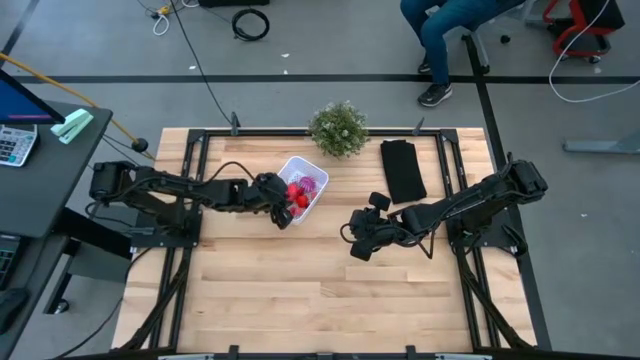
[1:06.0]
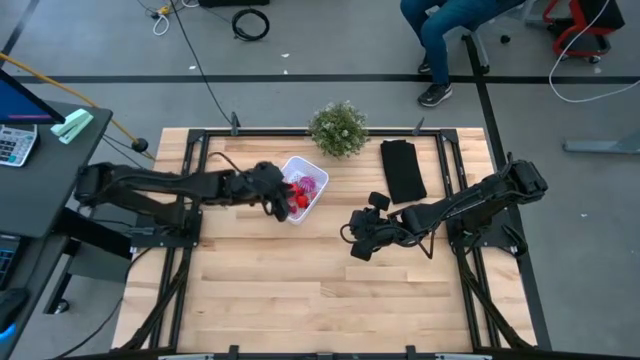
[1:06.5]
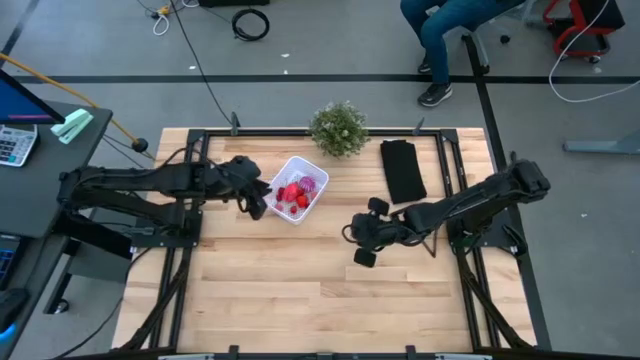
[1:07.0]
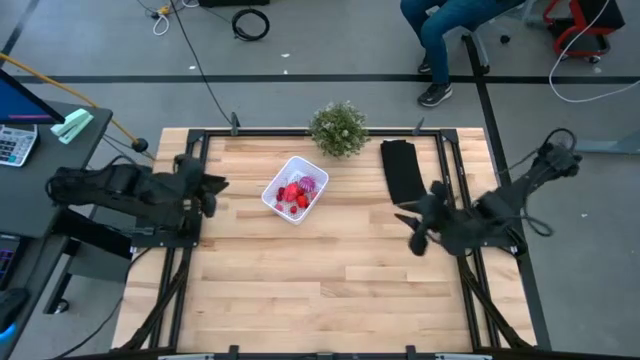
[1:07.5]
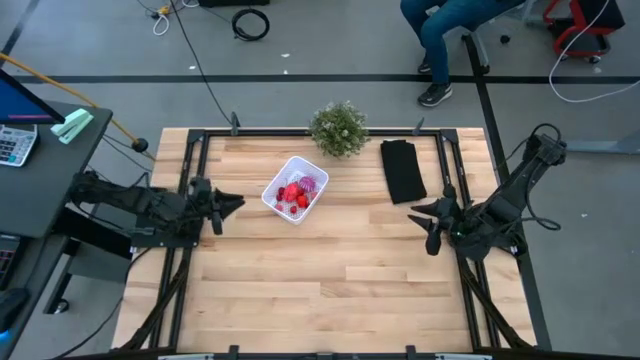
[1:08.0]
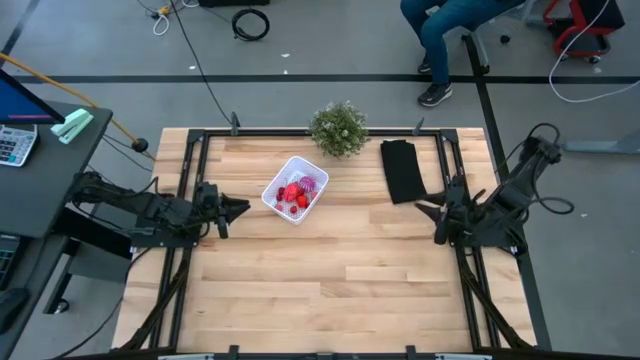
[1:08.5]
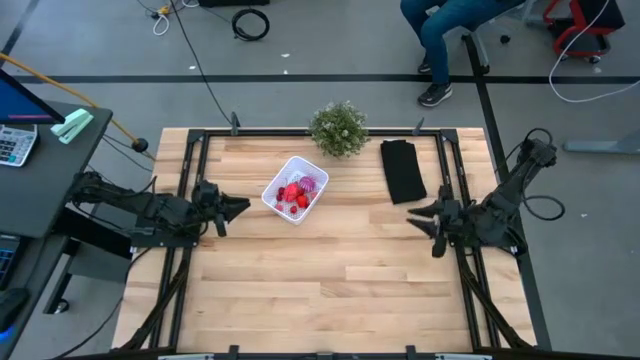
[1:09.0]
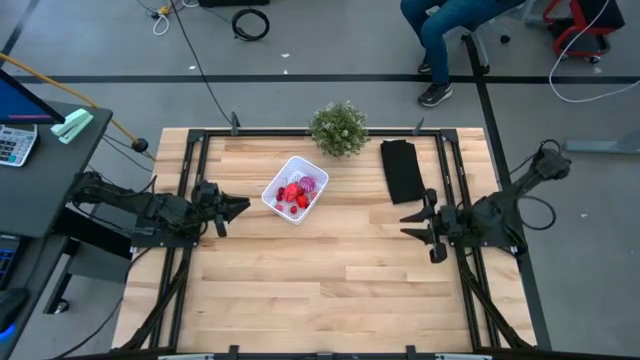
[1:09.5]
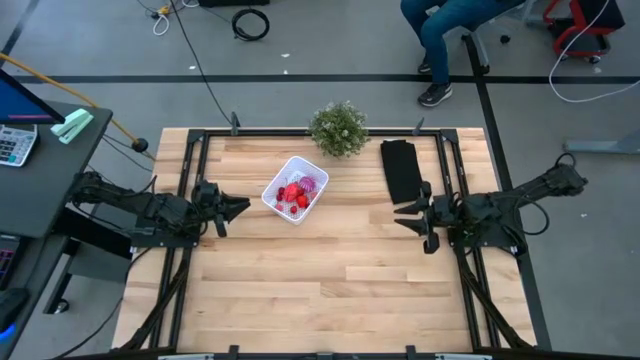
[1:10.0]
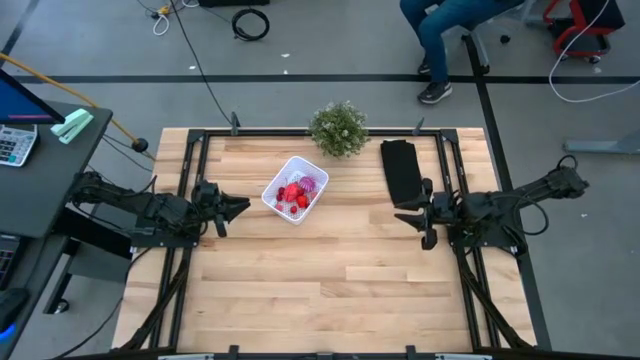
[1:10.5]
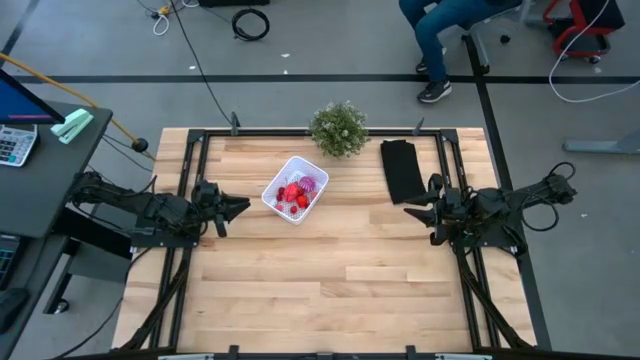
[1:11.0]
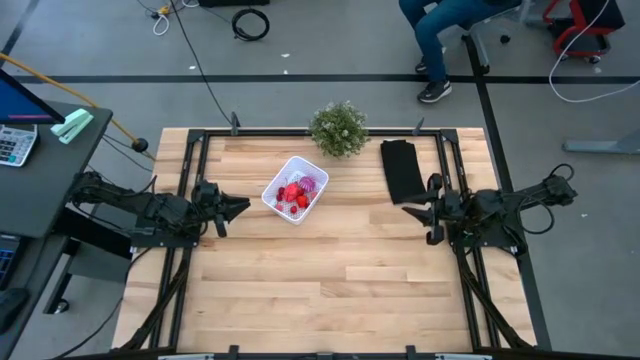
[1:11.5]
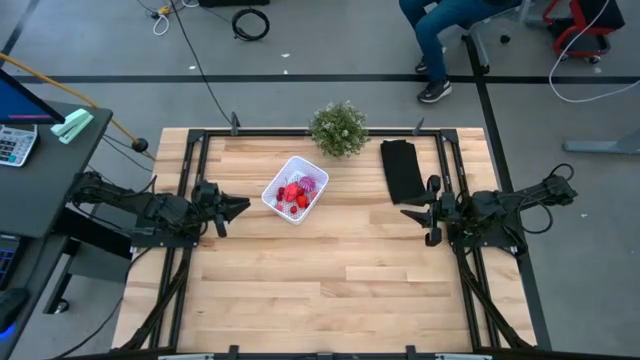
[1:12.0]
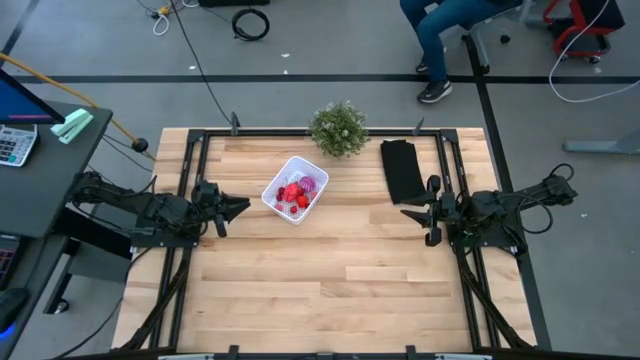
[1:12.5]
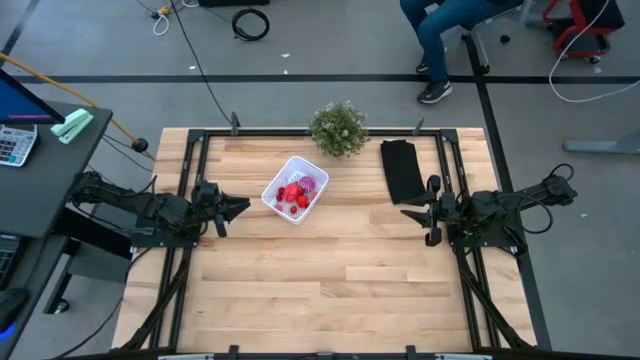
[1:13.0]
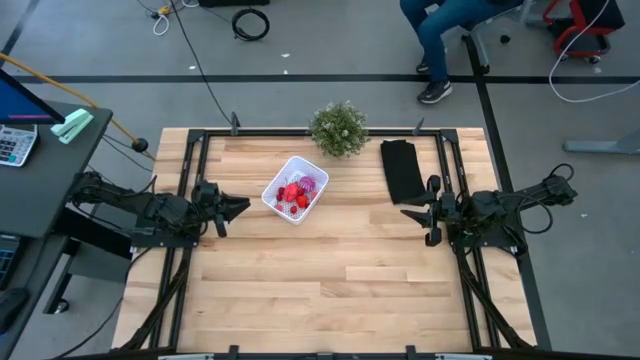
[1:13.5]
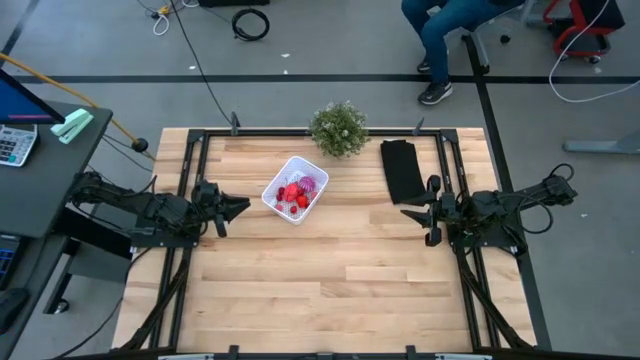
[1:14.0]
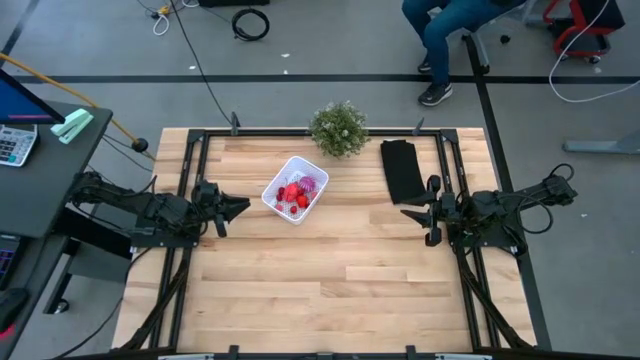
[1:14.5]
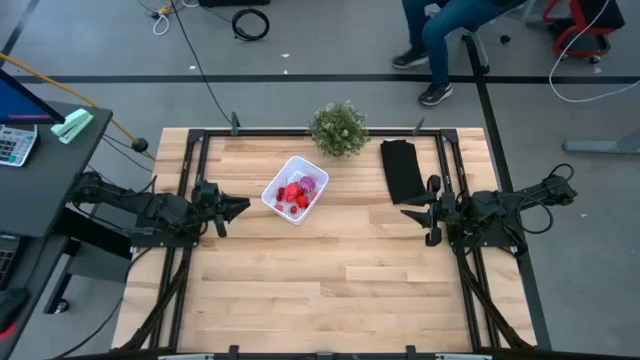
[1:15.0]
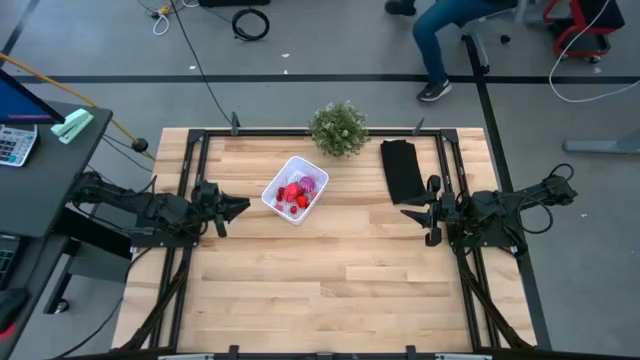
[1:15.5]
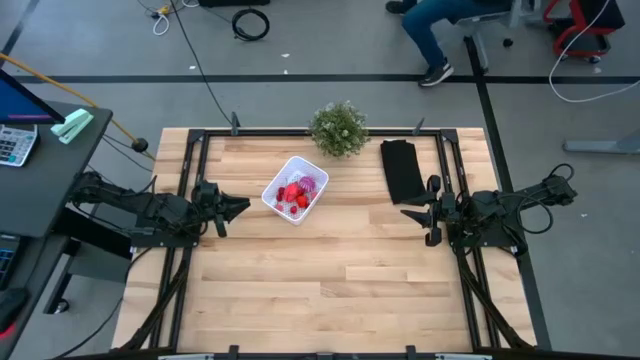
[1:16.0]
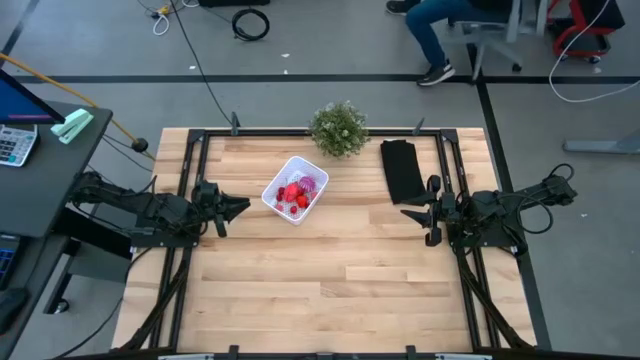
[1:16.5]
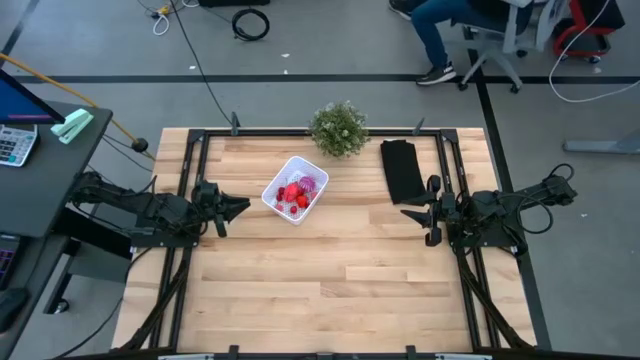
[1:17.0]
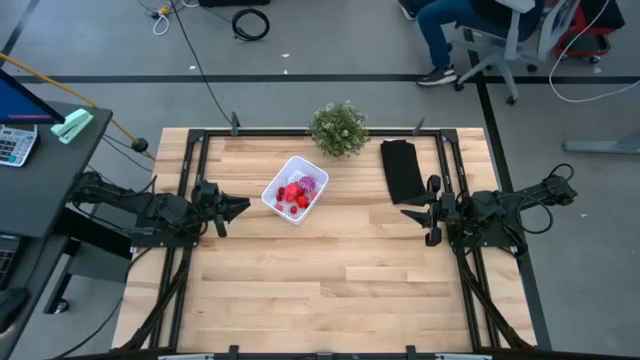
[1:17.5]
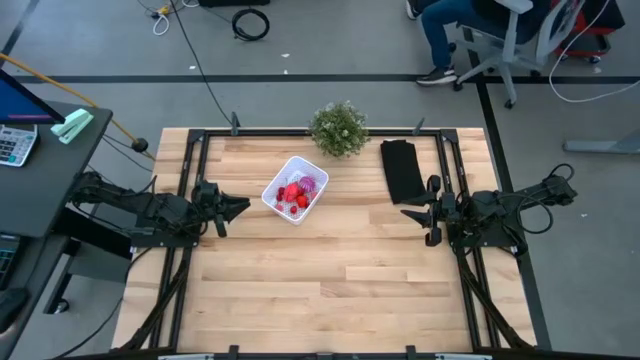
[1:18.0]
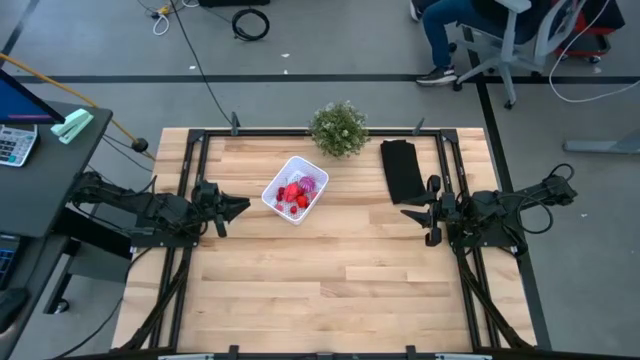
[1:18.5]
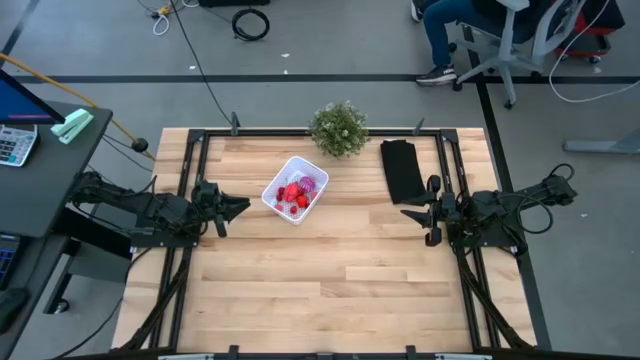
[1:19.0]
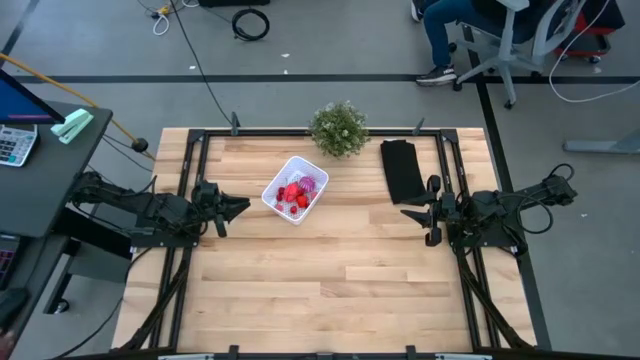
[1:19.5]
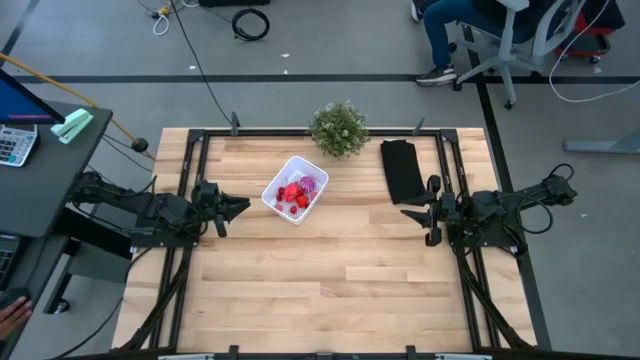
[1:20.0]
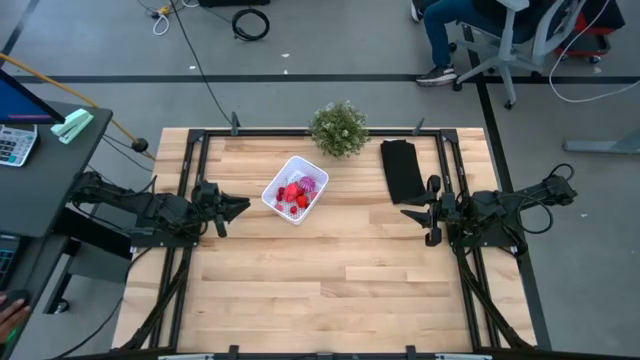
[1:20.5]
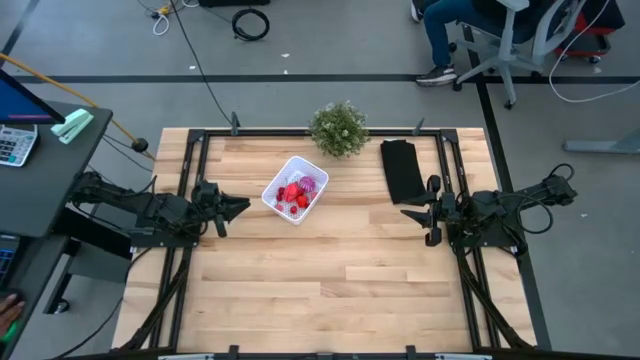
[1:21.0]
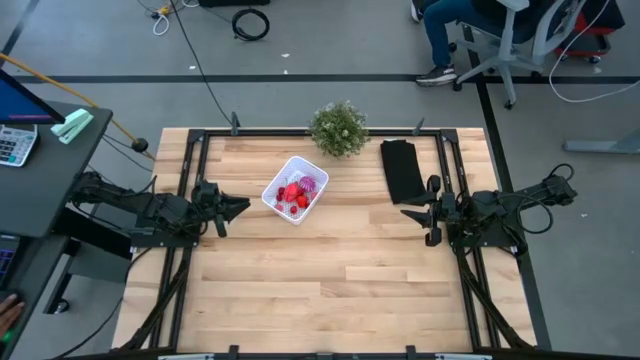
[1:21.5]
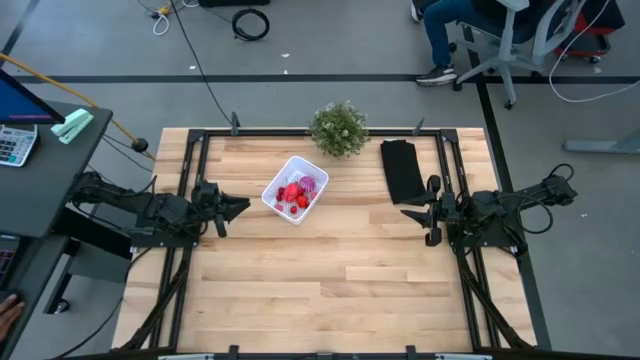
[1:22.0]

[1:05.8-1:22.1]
Task: Pick and placing Produce into tupperware
Return to Home Position

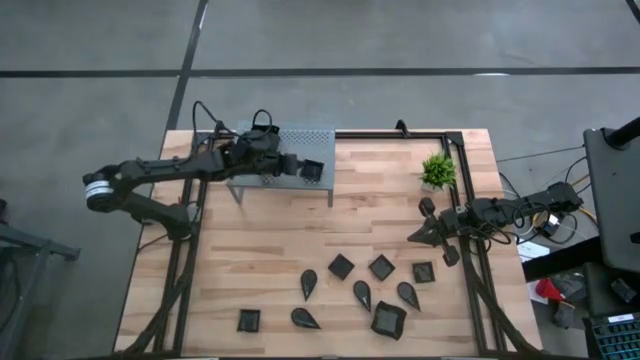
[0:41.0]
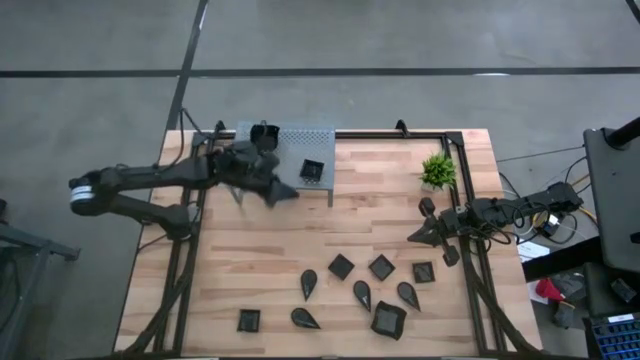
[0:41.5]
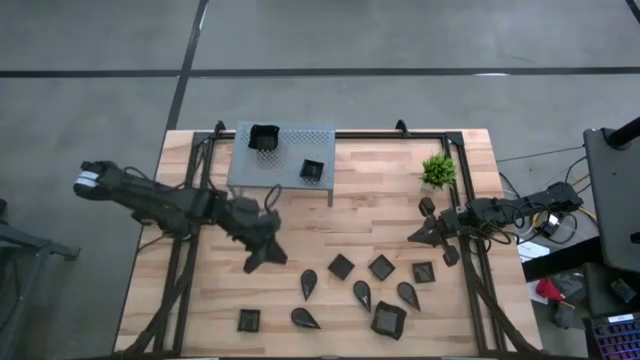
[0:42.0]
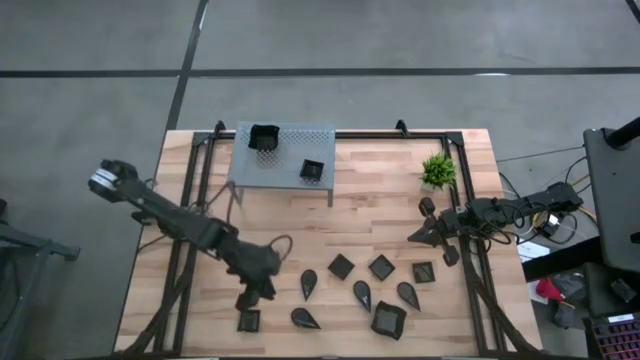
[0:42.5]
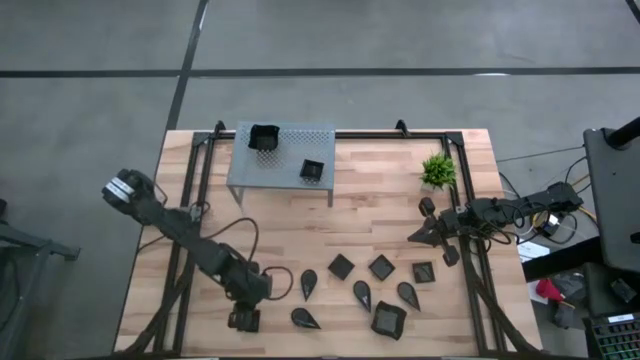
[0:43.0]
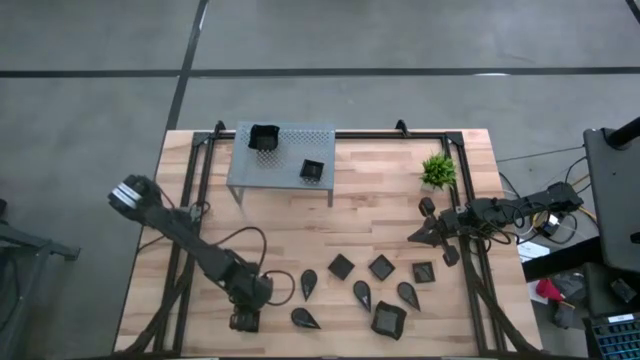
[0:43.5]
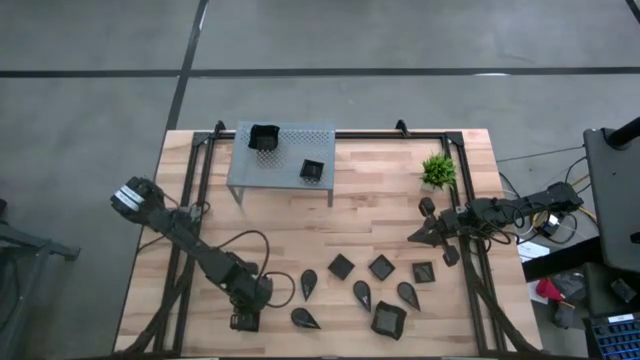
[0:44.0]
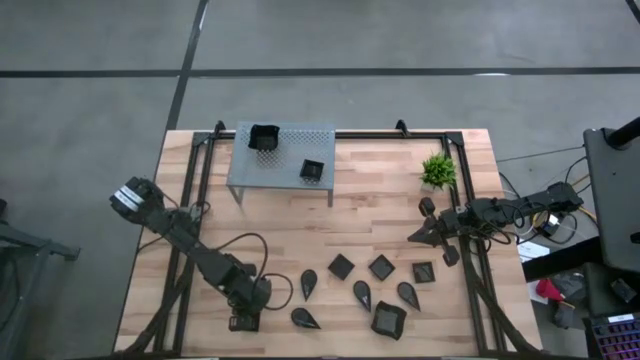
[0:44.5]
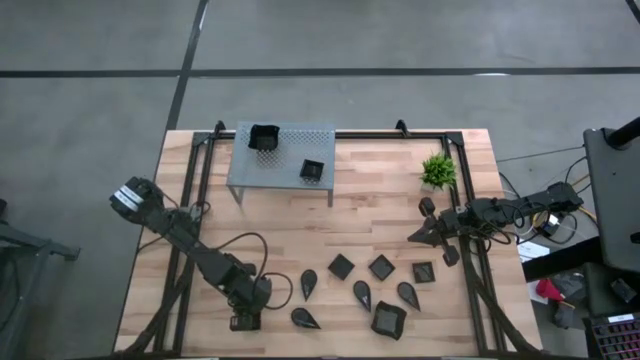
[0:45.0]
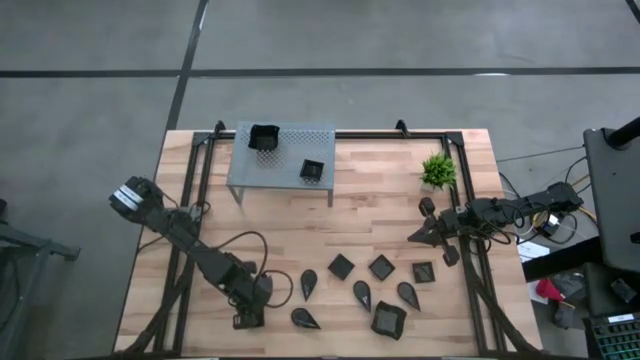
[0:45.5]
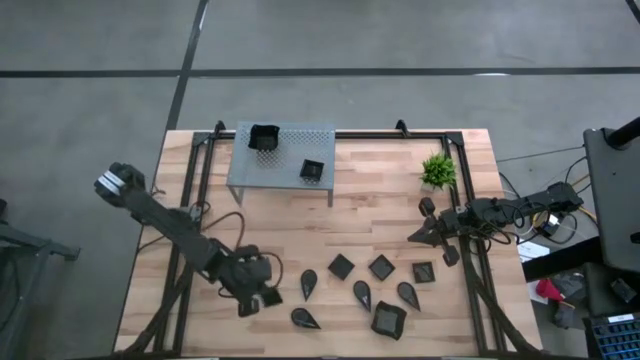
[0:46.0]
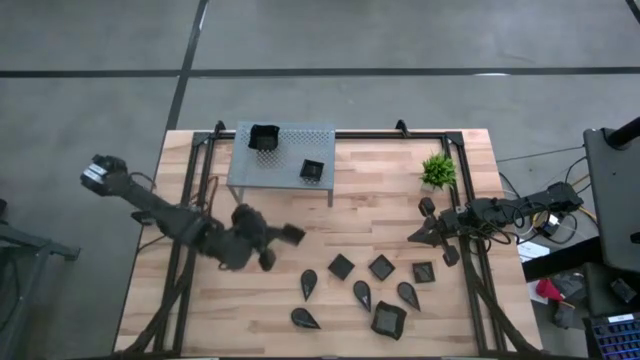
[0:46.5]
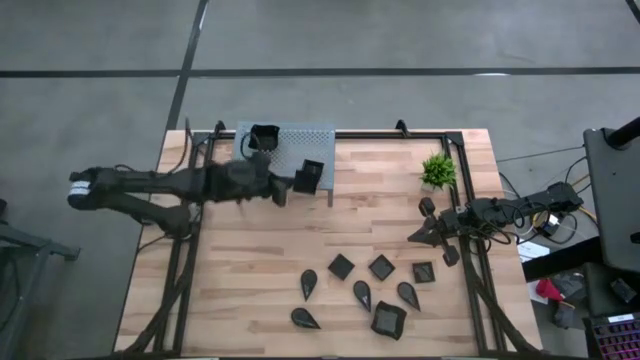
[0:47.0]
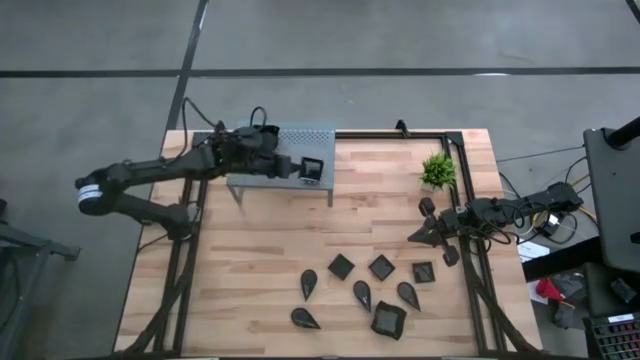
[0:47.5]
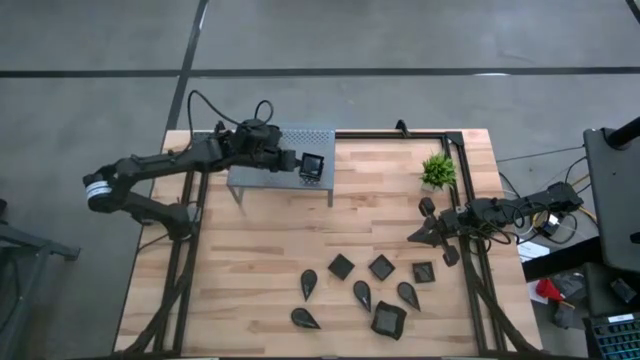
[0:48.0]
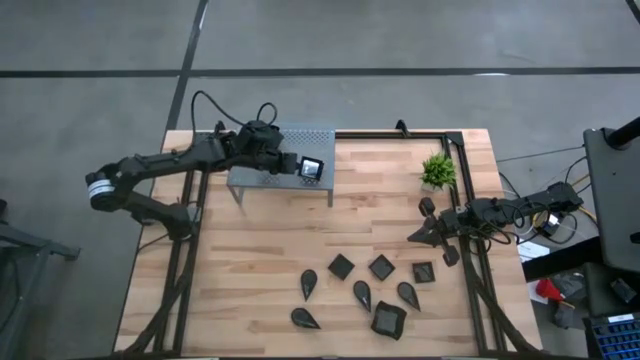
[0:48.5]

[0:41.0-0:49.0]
Task: Pick & Place Mini shaped plates
Stack the black square plate on top of the black square plate on the shelf
